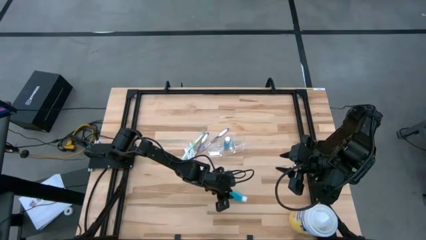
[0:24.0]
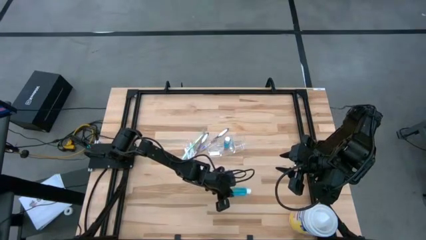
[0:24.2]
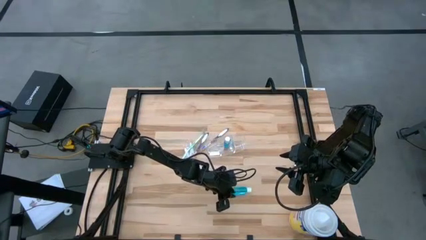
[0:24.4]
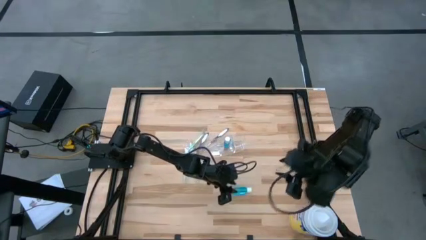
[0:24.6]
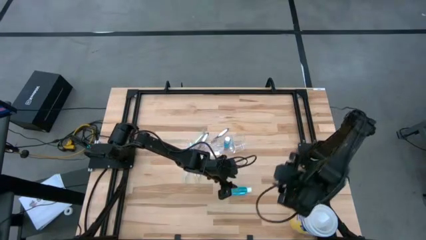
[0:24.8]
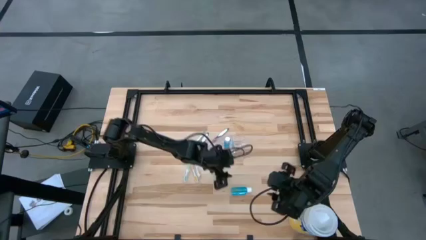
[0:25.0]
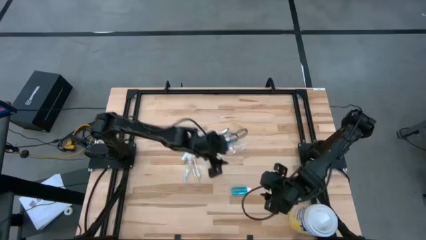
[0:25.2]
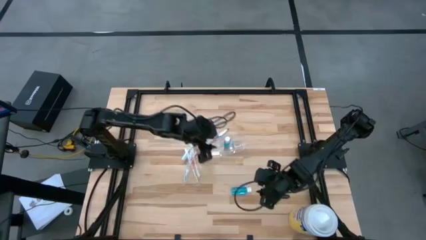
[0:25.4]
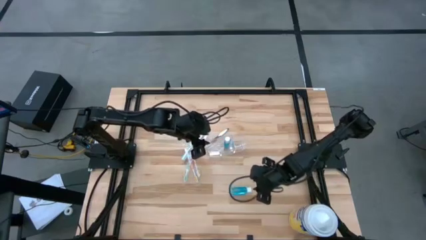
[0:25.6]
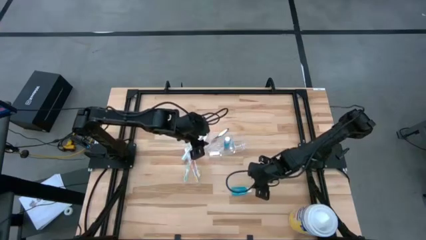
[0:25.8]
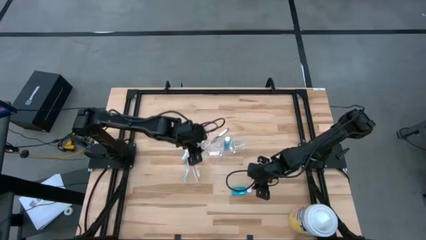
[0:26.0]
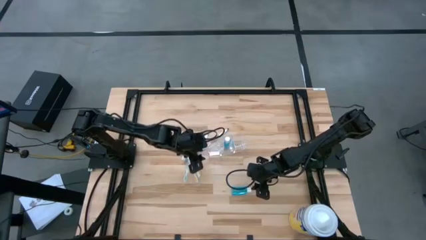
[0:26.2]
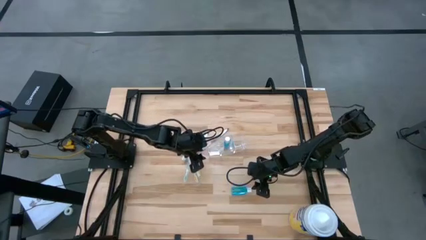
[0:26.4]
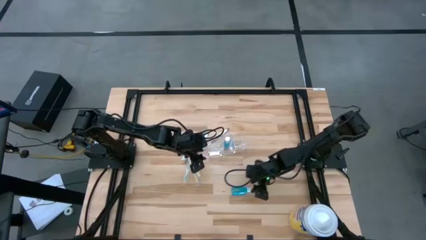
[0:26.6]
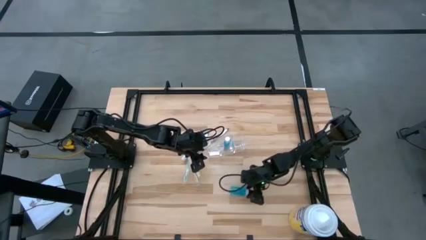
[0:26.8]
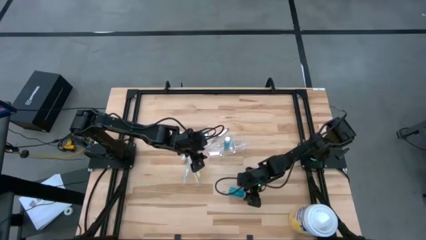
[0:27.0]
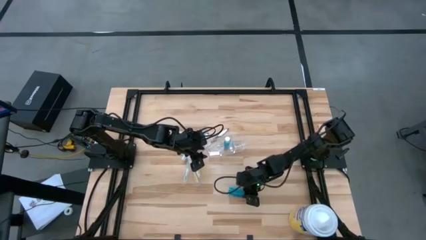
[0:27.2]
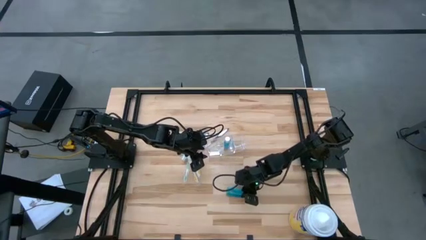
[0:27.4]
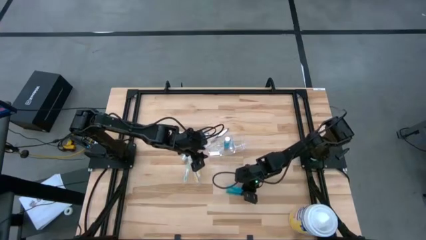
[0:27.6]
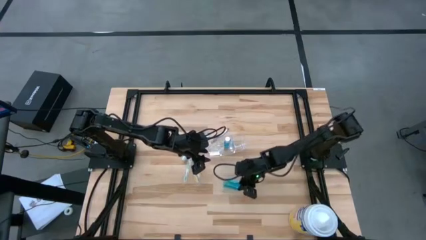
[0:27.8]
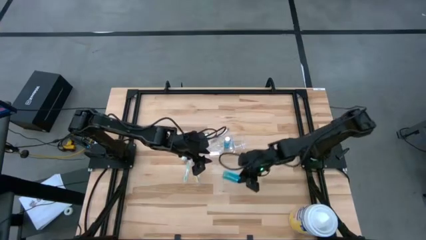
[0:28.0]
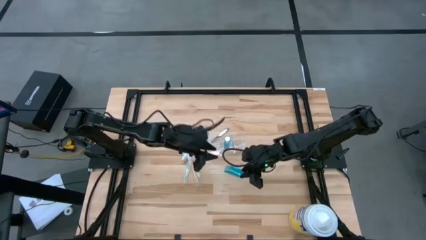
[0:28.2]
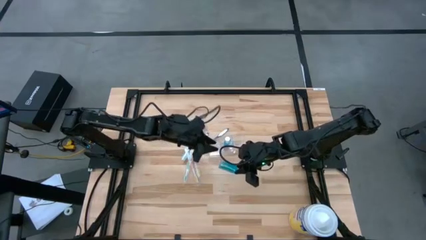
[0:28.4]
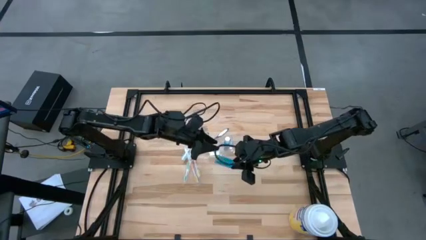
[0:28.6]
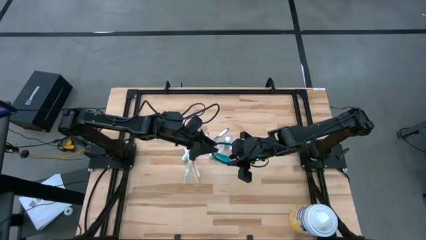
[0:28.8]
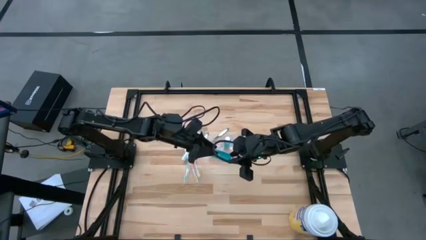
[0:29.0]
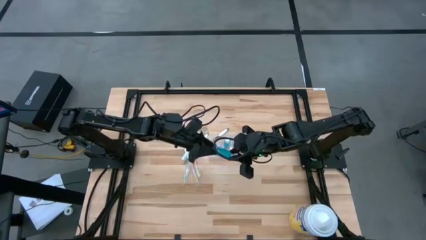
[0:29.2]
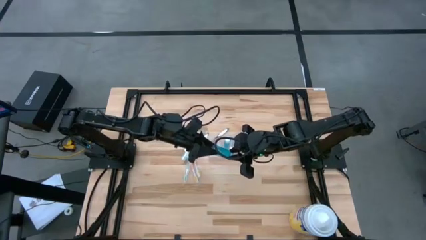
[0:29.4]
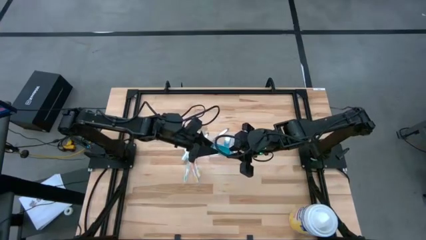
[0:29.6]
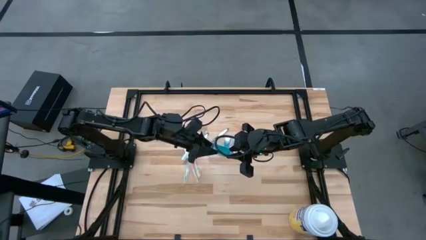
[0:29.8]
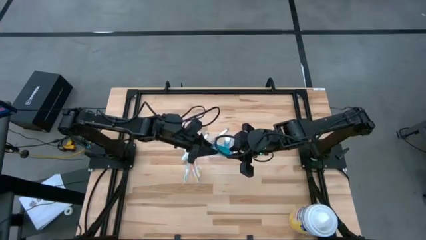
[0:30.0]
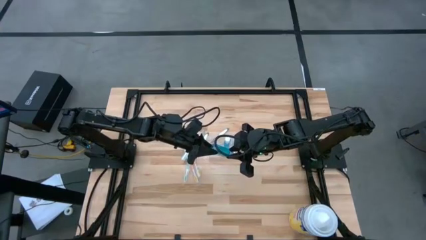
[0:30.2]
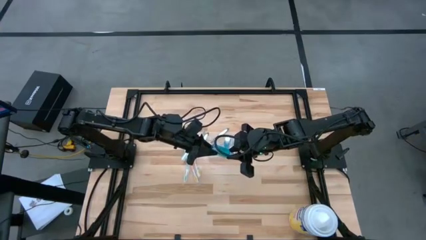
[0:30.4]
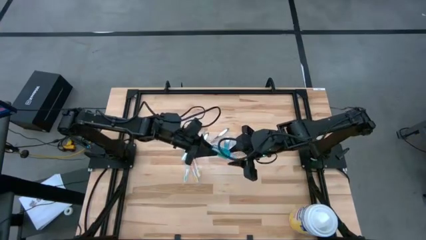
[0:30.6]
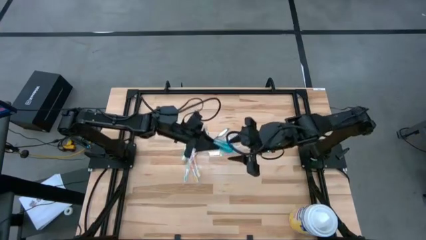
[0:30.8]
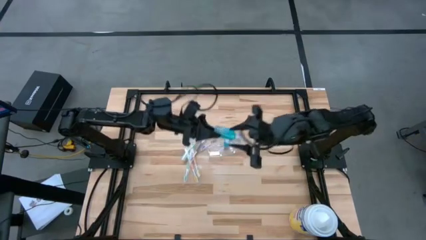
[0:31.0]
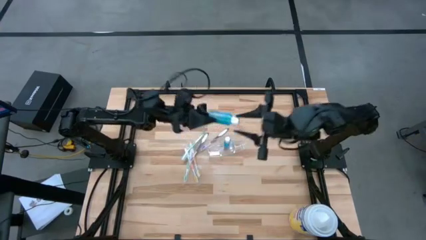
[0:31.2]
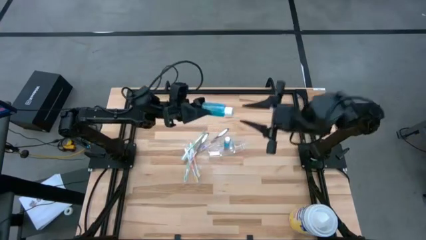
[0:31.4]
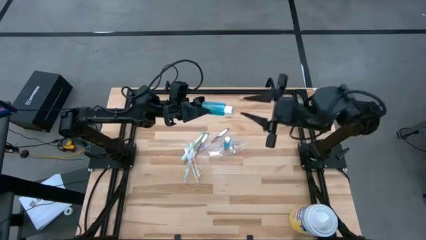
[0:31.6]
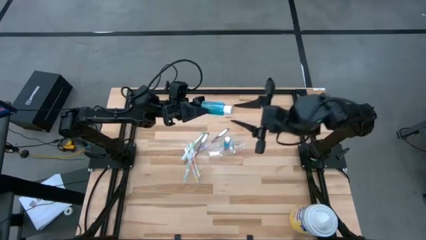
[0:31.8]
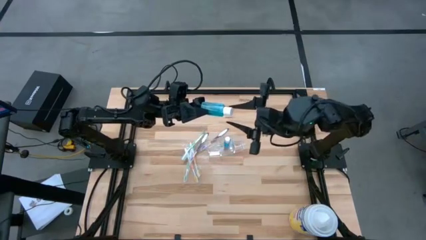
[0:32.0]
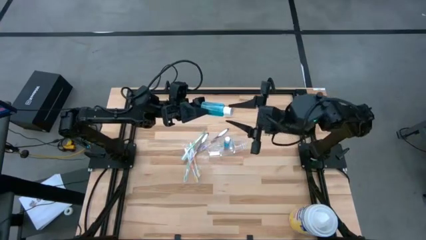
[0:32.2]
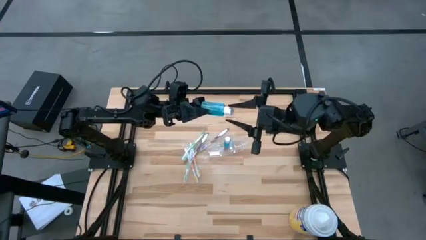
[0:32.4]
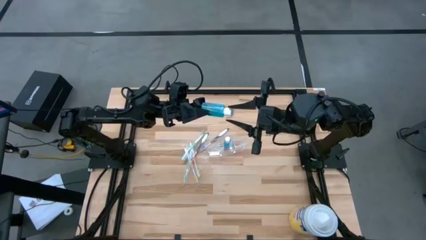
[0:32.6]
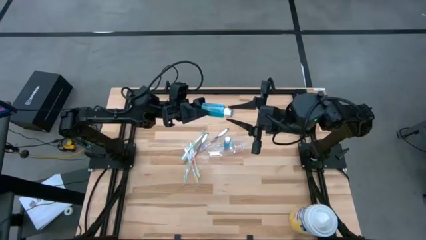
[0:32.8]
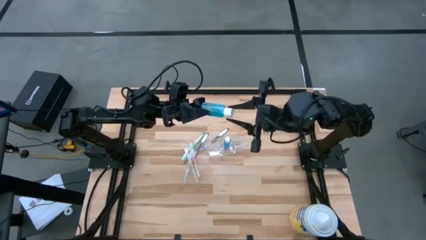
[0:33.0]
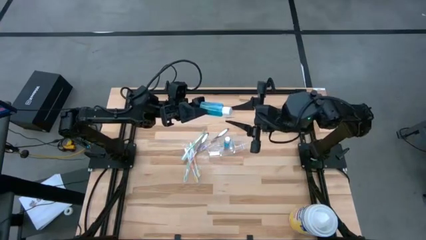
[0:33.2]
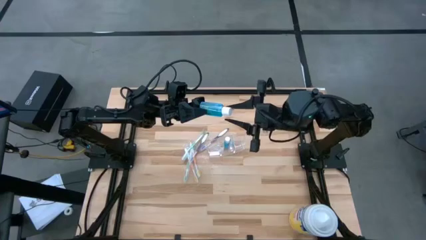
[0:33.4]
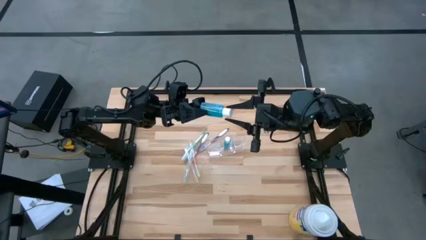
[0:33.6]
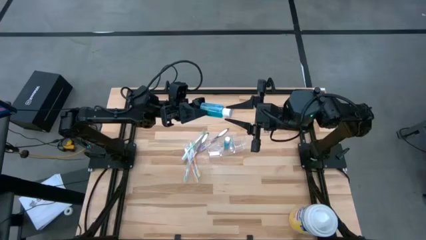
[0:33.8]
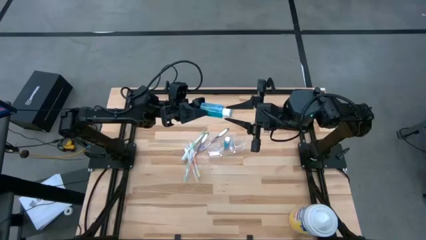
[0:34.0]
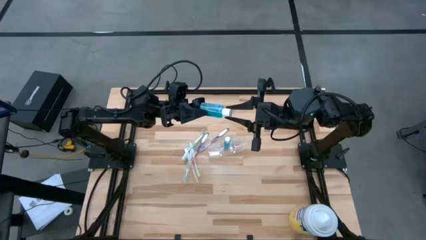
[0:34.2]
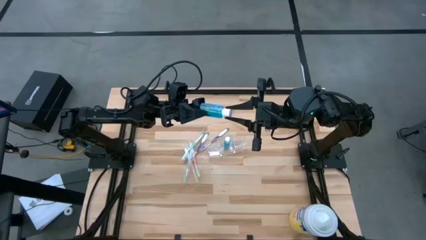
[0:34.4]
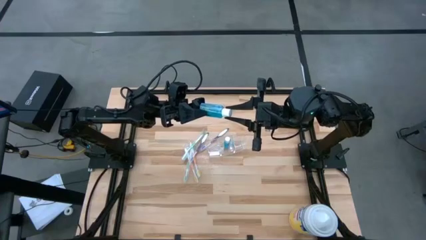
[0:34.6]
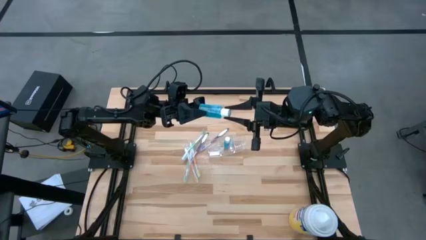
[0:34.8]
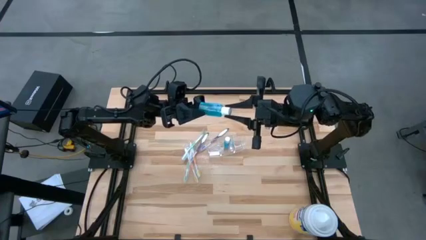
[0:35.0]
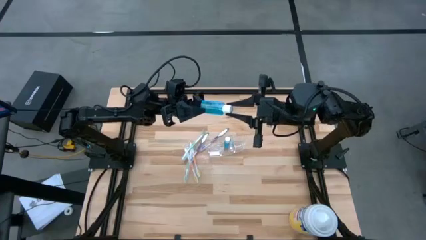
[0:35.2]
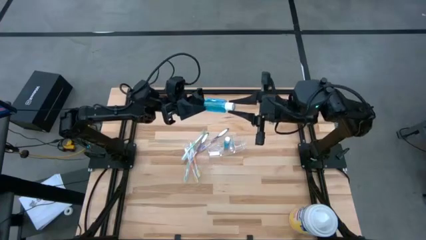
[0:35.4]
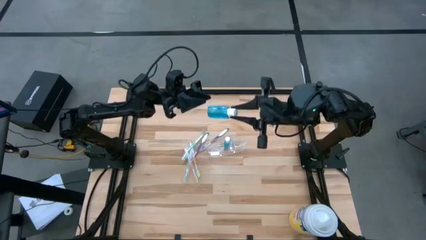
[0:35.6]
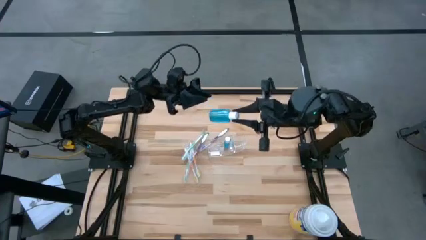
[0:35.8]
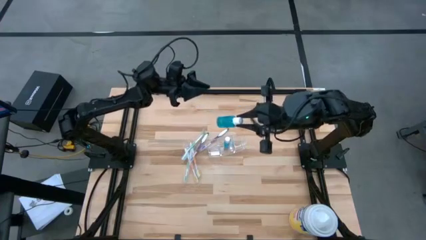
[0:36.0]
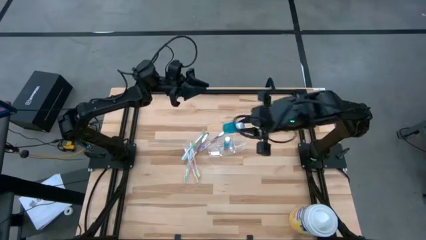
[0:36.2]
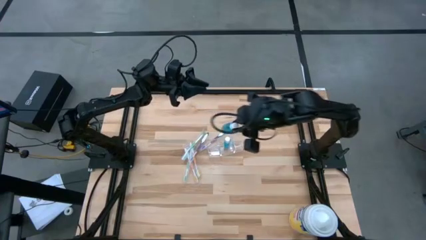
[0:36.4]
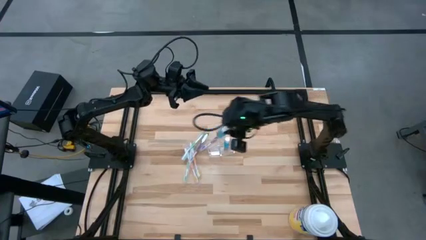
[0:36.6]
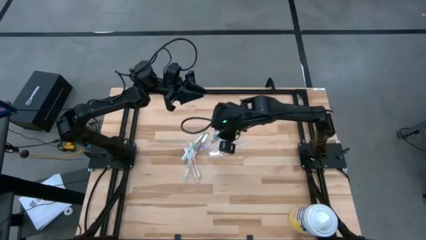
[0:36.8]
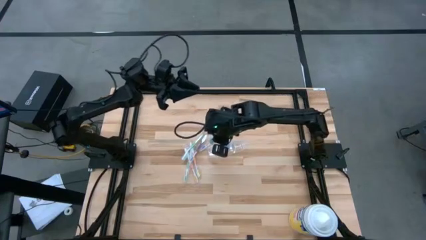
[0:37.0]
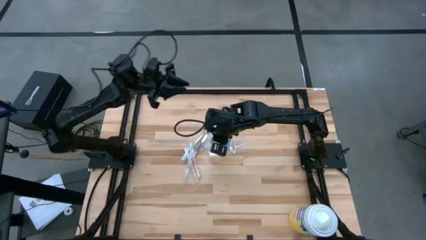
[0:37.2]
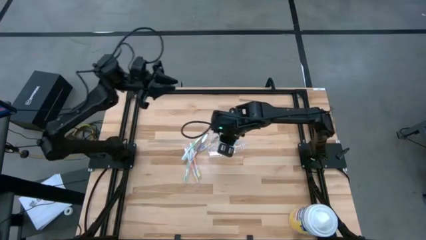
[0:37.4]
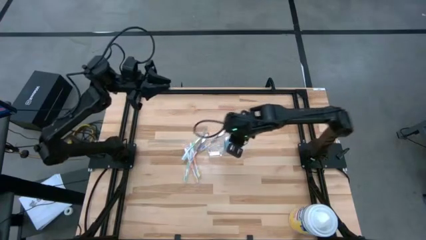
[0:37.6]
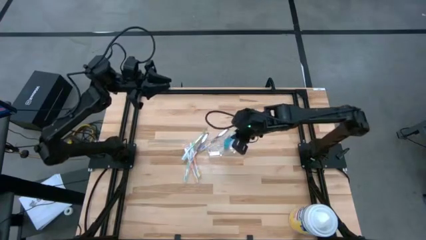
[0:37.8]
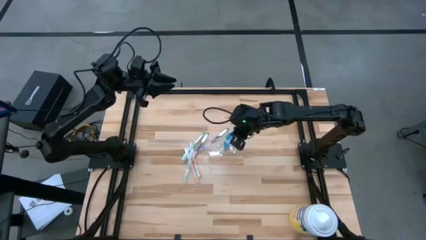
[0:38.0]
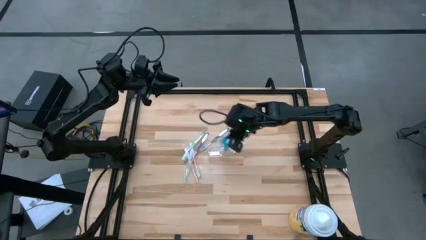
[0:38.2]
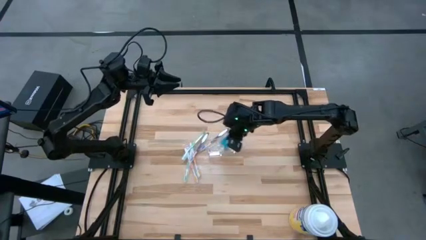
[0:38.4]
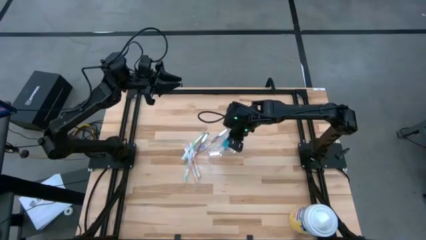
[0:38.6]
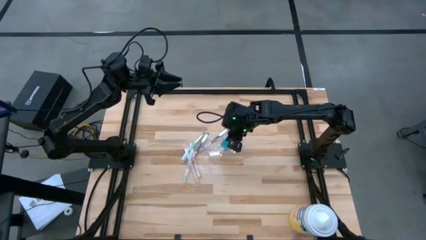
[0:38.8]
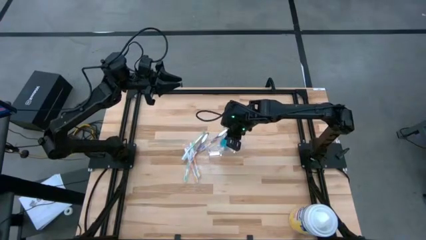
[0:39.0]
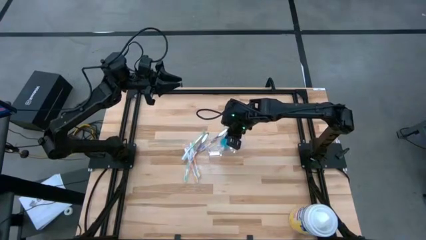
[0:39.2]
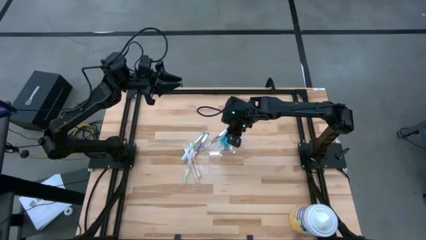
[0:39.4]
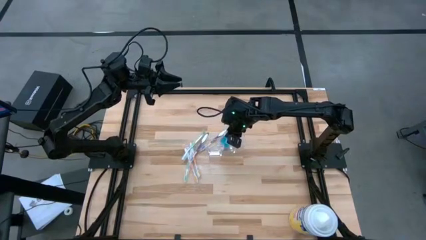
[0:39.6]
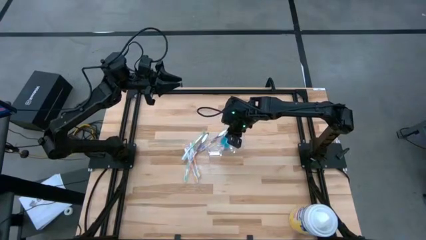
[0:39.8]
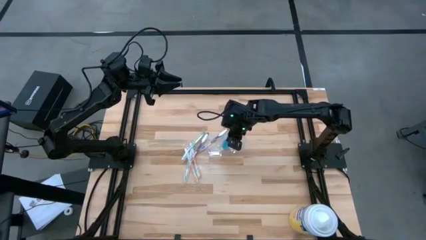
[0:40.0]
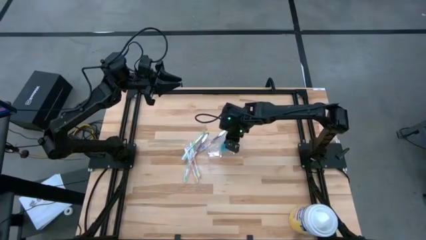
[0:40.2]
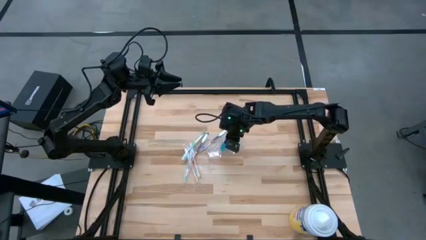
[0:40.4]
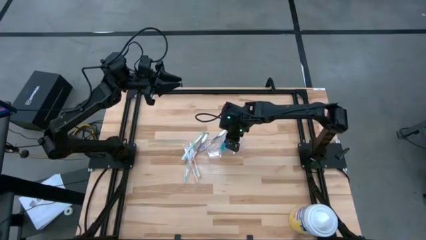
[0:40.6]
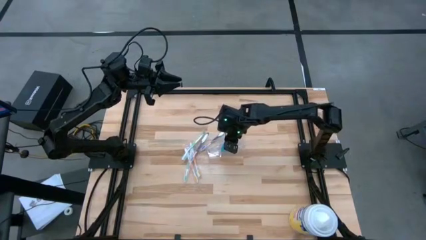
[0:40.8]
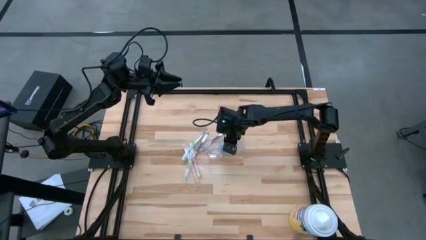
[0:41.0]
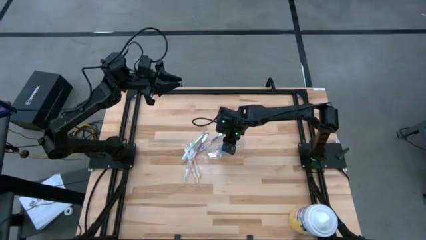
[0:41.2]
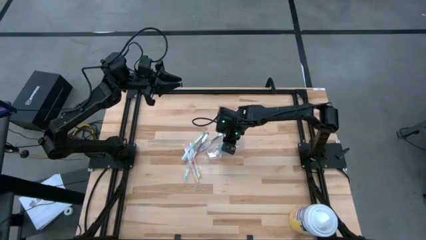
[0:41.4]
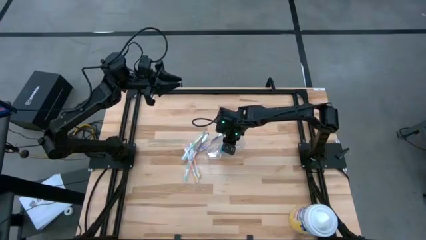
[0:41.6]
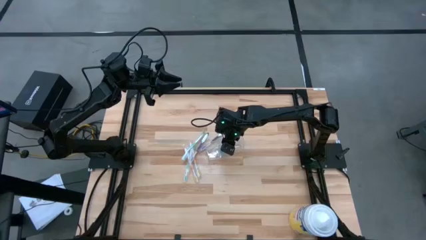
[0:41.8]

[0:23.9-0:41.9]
Task: Pick & Place toothbrushing station
Put the blue mouthwash bottle into the transparent organizer
